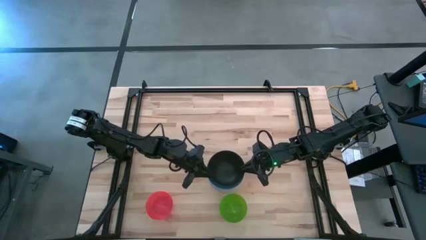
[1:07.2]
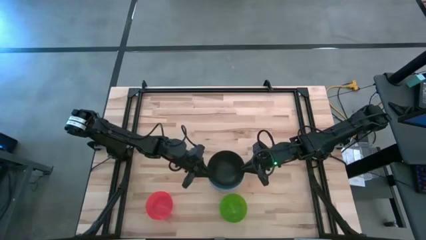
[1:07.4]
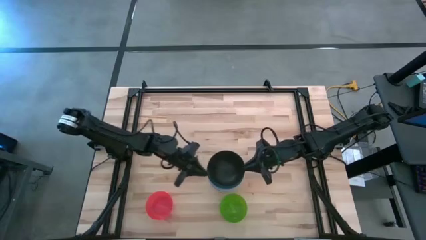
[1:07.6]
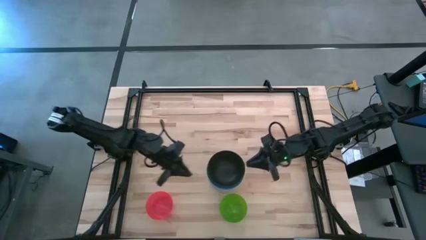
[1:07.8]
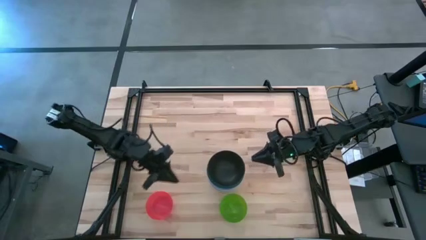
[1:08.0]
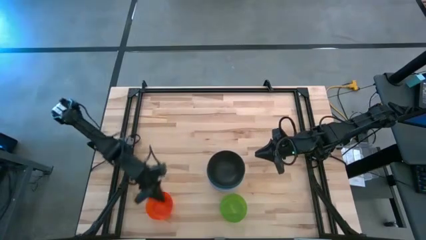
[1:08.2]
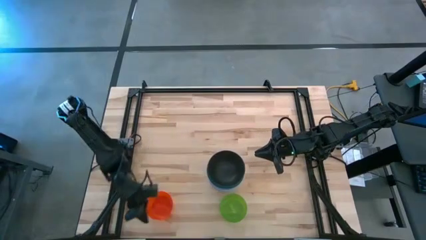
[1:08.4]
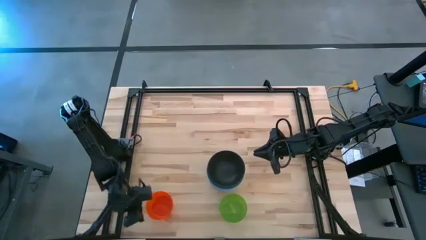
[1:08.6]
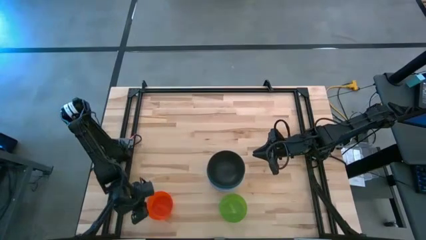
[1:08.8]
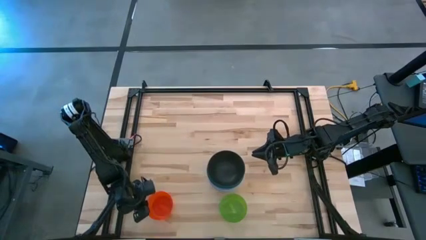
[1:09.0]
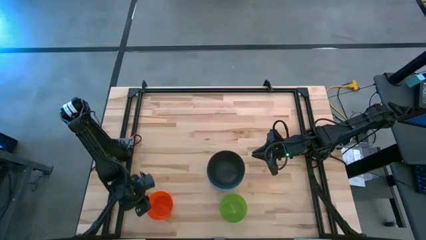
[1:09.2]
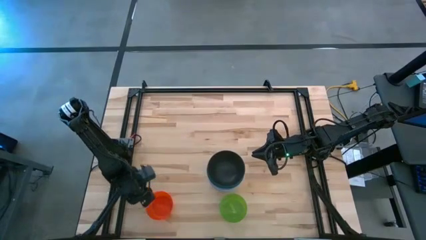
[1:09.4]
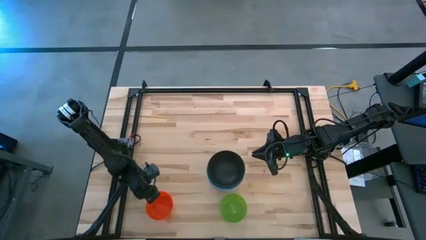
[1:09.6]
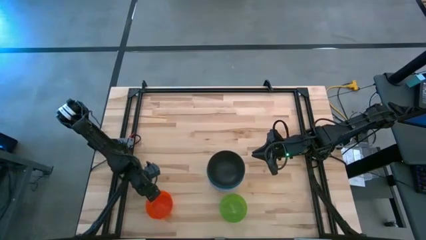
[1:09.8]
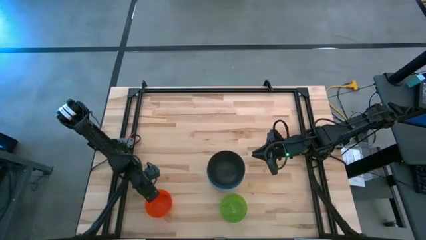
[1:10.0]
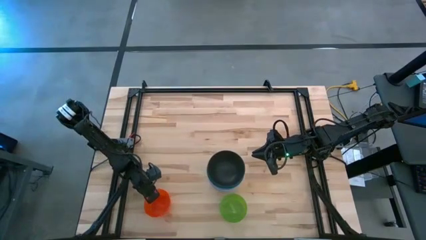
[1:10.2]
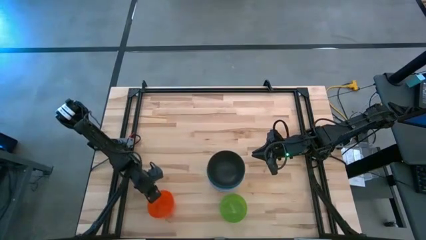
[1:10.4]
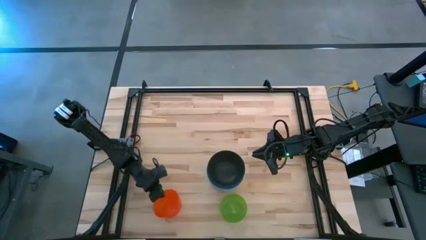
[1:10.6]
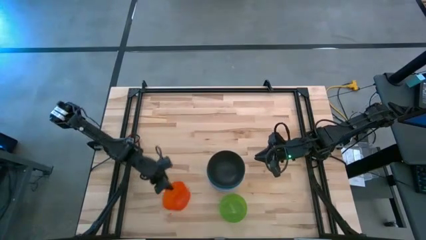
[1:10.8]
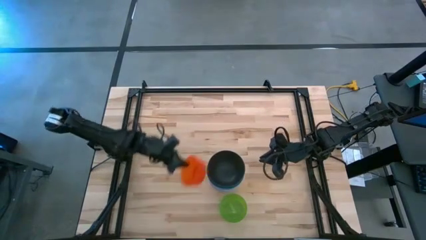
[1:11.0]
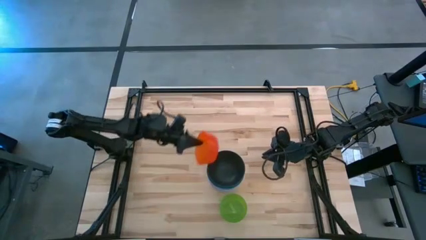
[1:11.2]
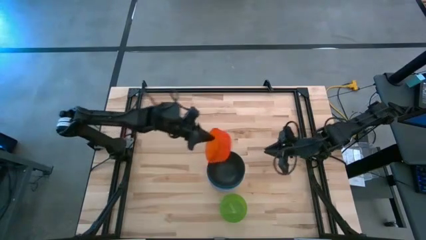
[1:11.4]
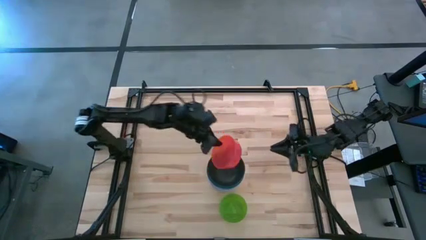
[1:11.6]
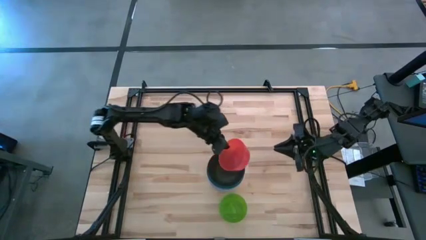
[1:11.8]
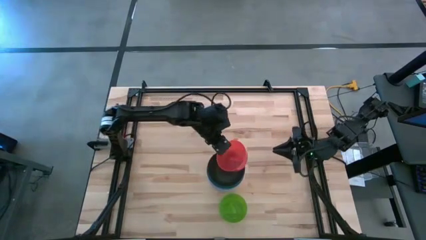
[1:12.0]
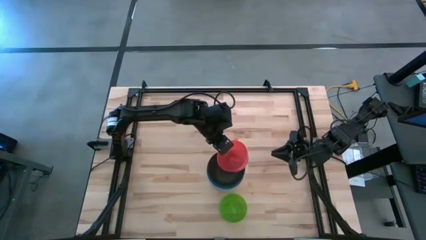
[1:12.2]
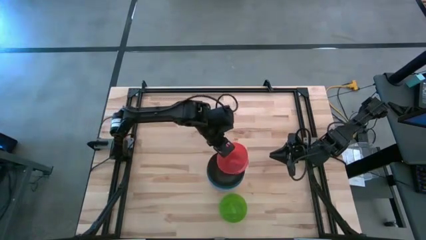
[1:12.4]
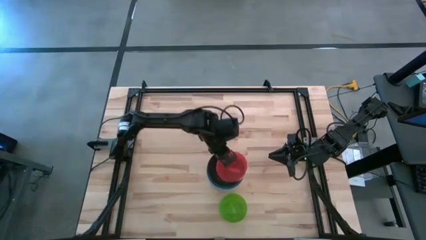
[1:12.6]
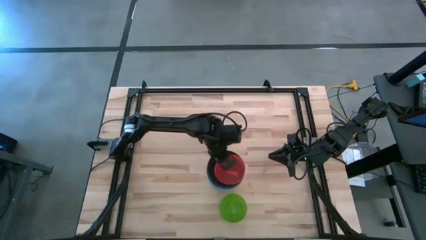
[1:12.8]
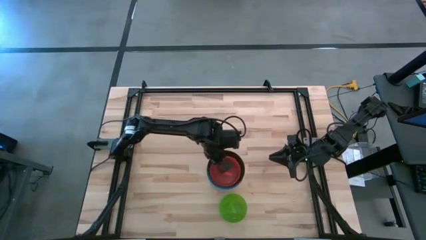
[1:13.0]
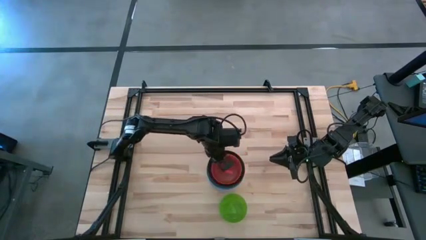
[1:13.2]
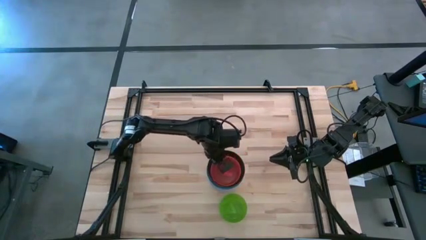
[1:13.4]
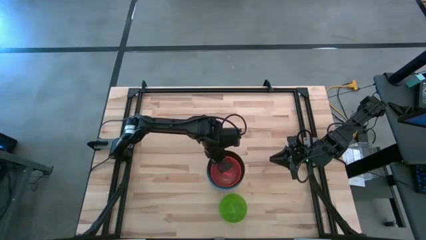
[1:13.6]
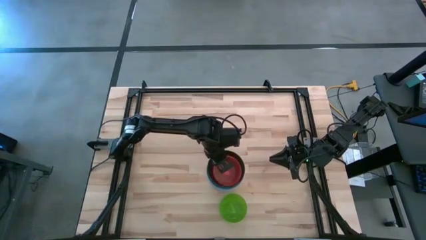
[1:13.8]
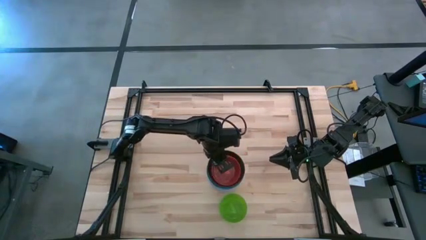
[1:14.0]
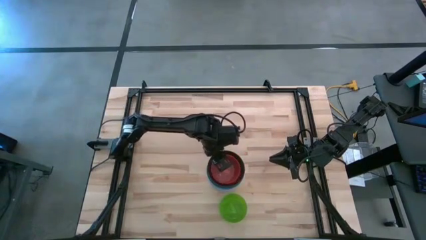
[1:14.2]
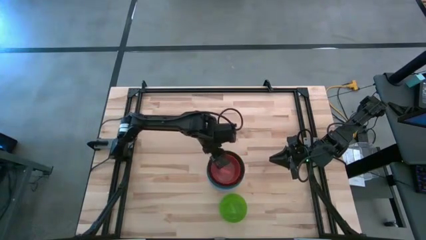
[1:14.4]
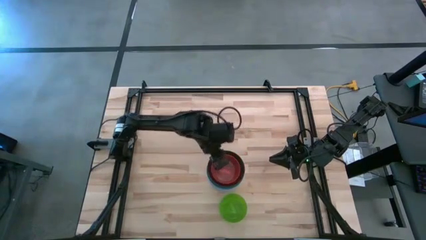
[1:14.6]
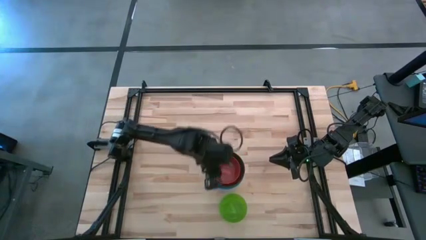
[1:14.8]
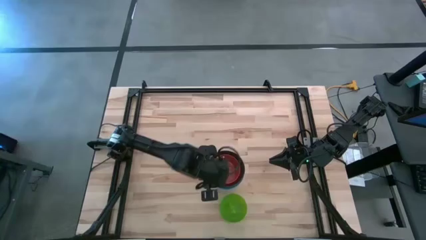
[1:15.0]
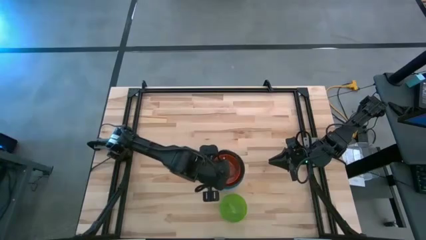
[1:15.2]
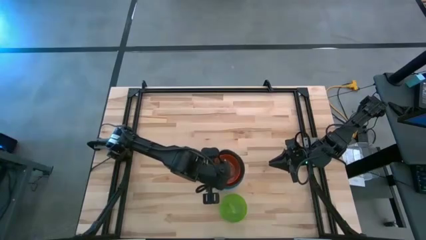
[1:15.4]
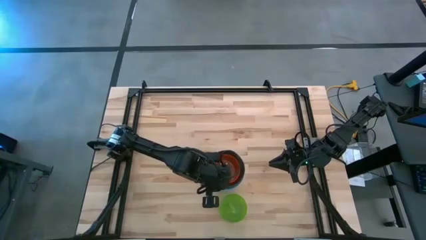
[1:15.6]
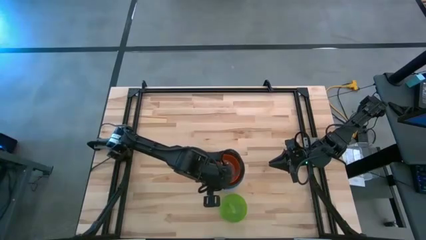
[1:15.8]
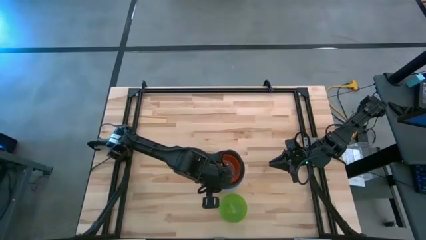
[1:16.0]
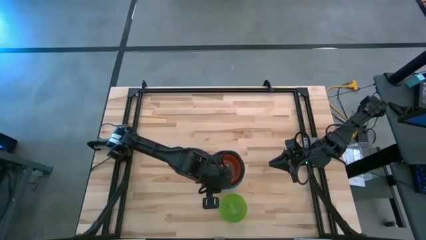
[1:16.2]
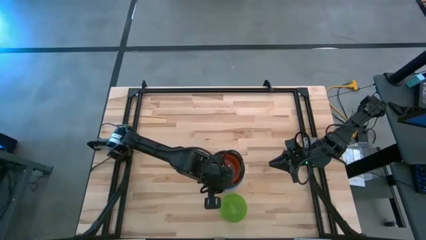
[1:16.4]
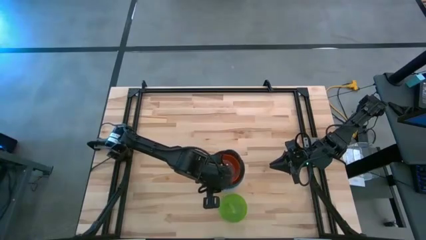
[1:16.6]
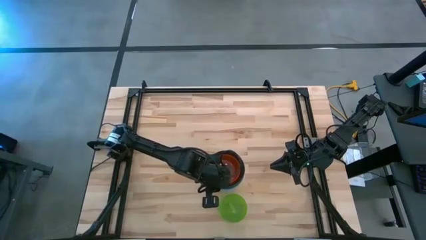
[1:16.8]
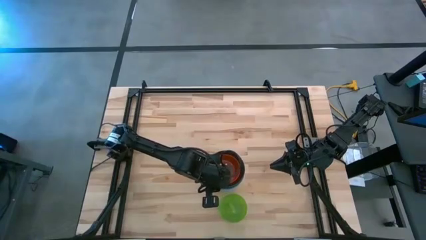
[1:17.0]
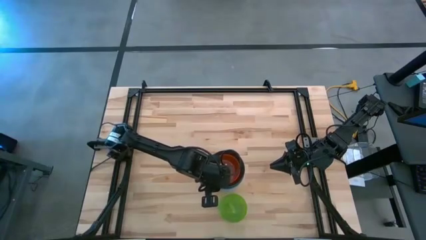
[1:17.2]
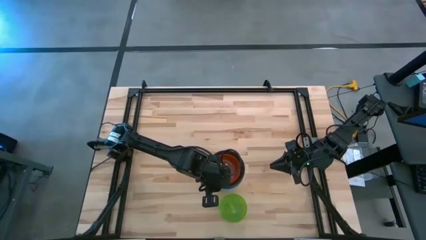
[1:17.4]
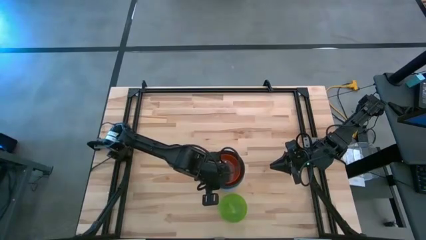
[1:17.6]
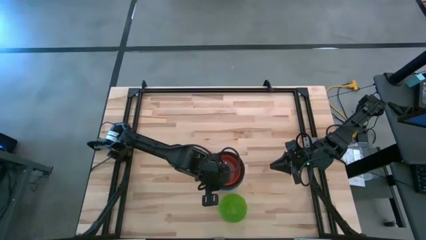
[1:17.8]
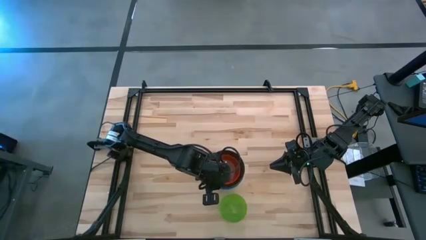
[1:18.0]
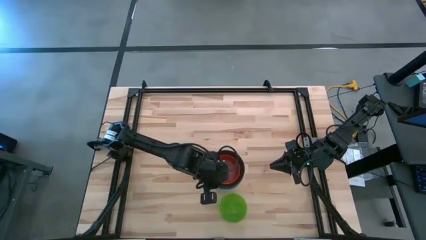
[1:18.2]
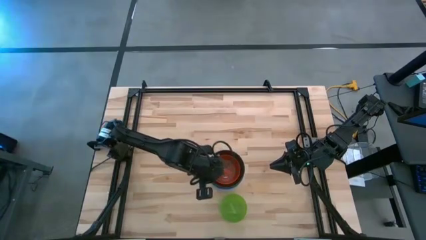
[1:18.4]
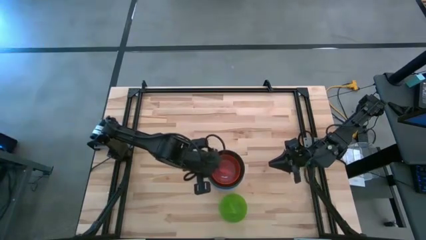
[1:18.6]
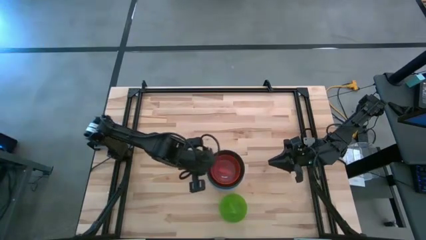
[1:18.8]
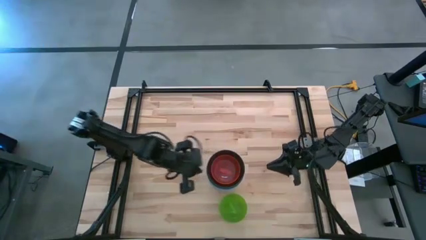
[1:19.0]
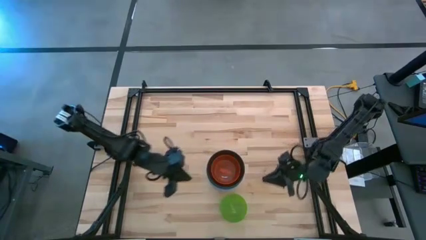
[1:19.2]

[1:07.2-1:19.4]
Task: Nest bowls inside each other
Stack the orange bowl on top of the black bowl

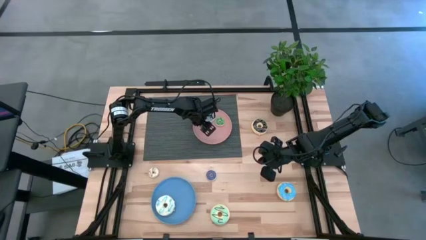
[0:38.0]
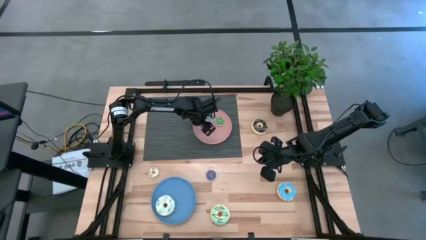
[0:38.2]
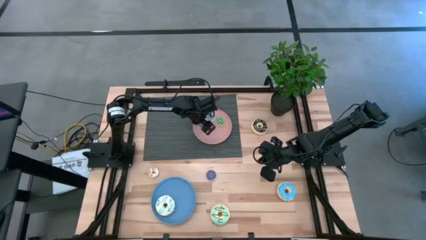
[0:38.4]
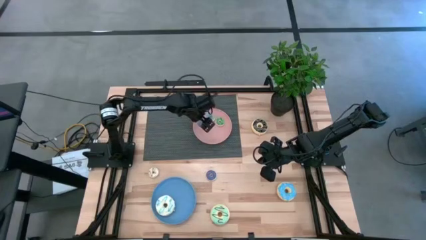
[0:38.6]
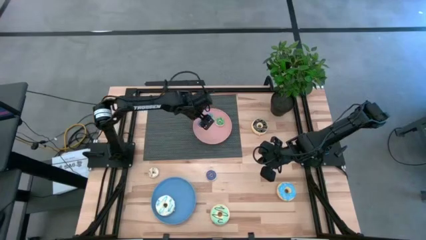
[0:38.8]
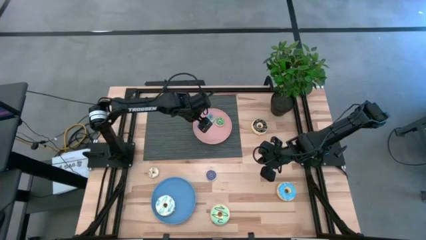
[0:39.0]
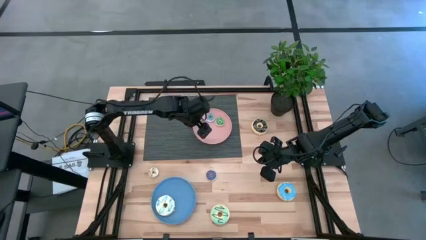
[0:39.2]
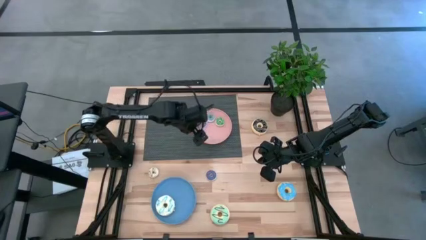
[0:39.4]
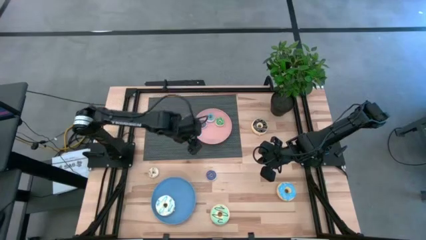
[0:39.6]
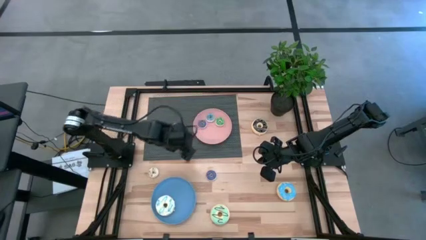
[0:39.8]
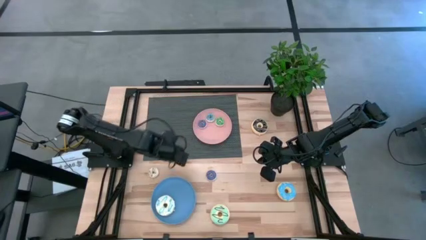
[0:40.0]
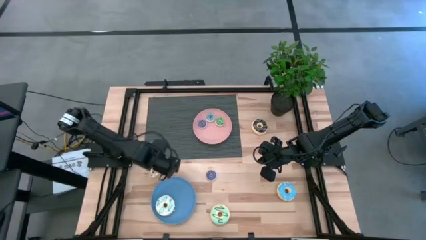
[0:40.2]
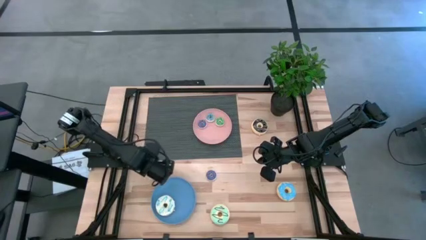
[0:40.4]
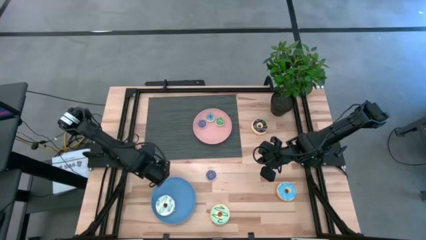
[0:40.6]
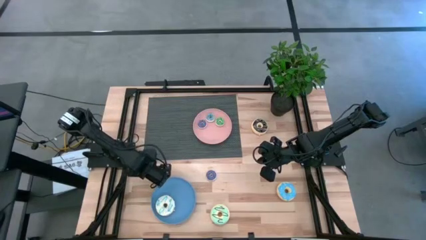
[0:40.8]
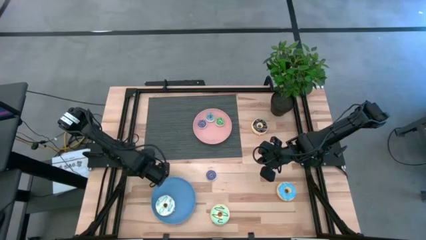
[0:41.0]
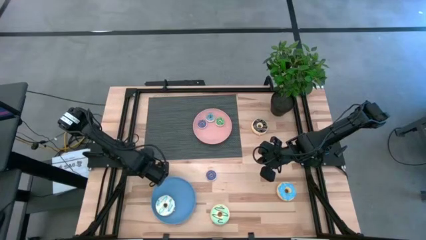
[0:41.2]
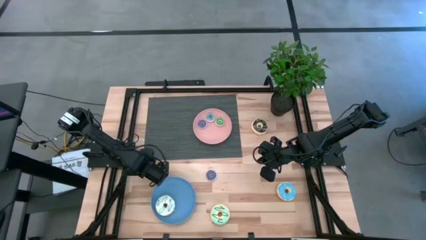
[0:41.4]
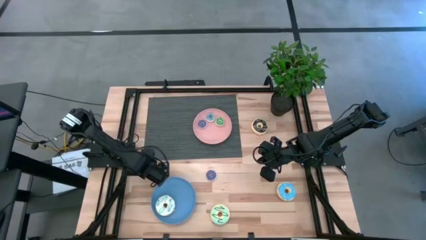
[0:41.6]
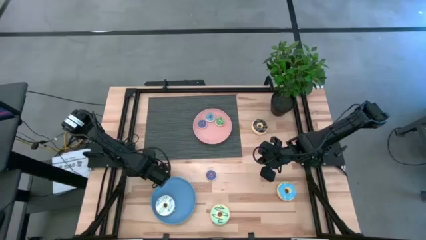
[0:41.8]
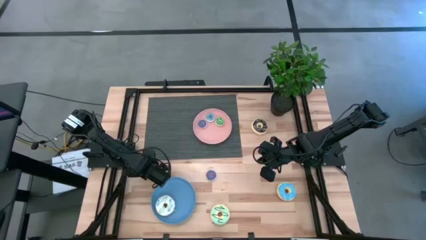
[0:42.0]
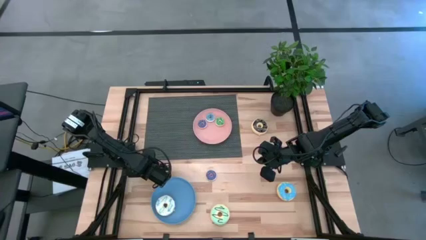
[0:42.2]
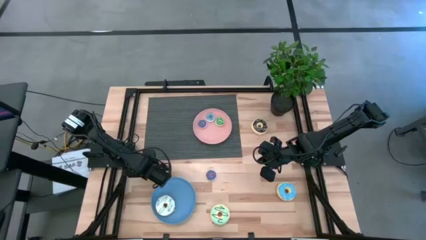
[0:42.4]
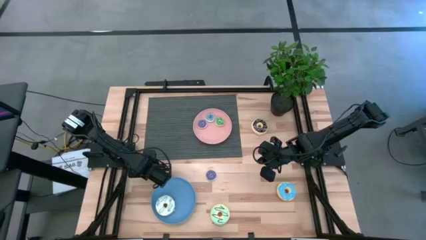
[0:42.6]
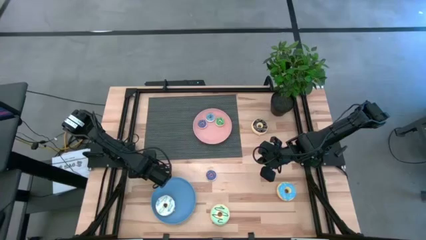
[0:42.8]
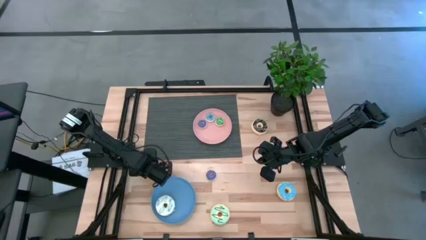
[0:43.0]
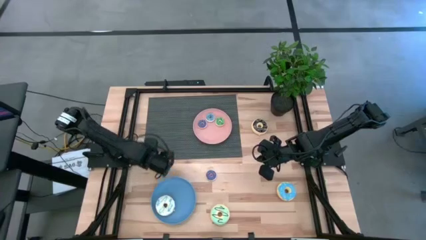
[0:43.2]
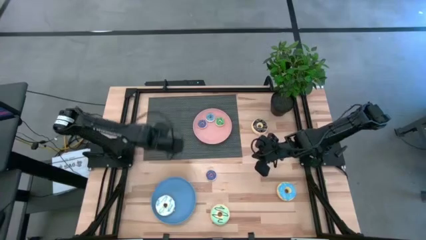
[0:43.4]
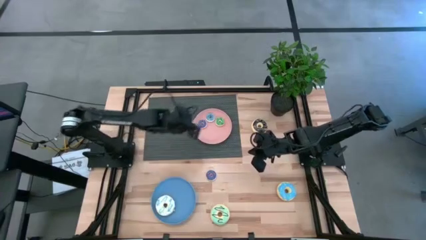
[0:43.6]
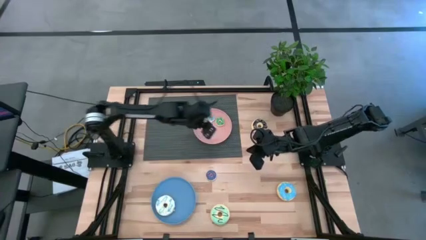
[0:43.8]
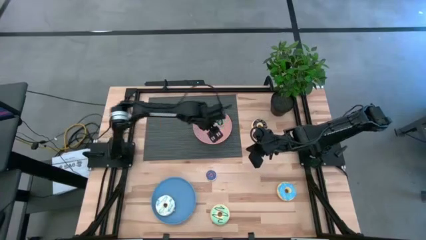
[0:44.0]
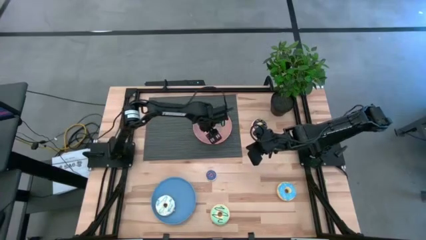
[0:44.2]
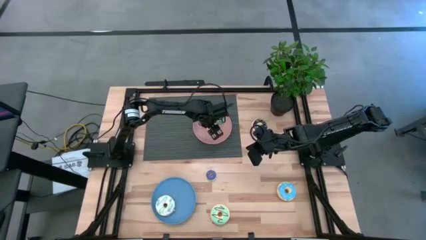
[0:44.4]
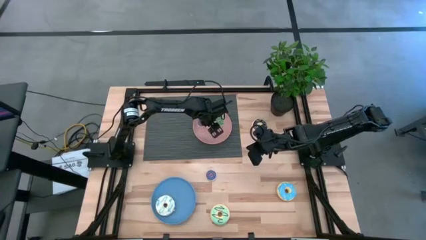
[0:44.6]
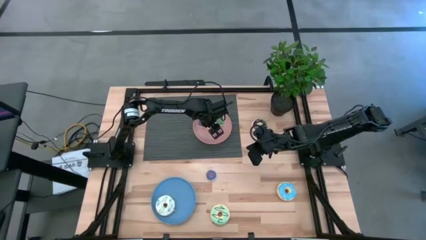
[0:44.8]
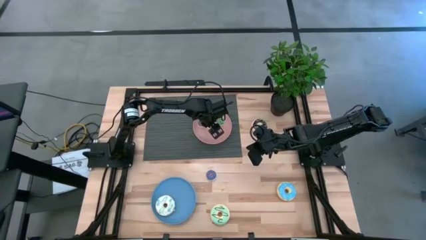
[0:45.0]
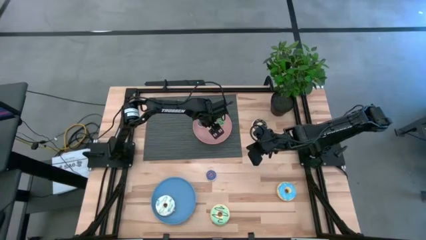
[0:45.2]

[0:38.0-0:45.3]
Task: Pick & Place donuts
Put the small white donut on the pink plate
